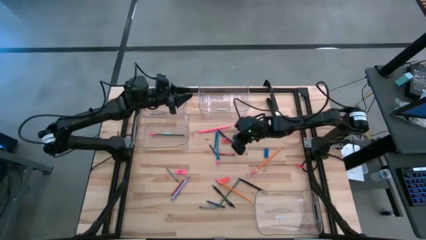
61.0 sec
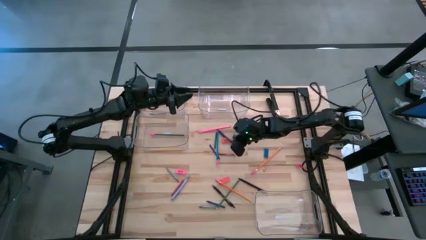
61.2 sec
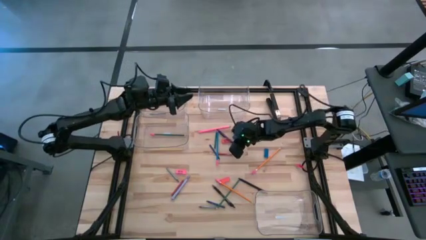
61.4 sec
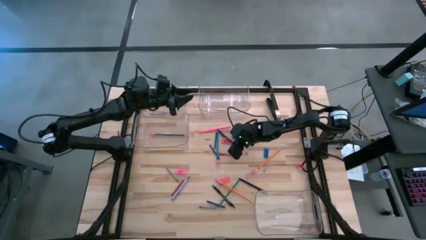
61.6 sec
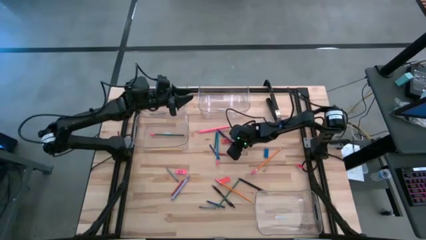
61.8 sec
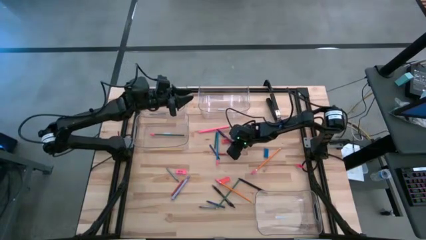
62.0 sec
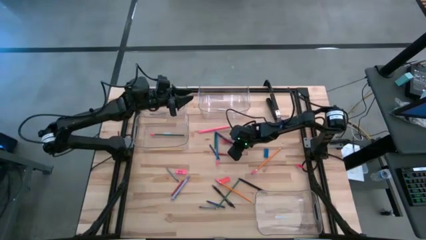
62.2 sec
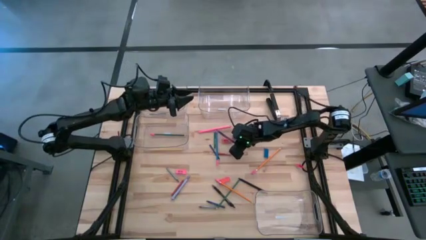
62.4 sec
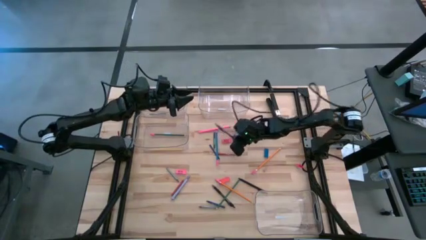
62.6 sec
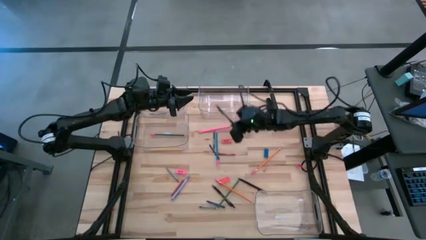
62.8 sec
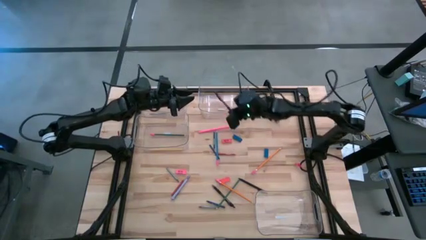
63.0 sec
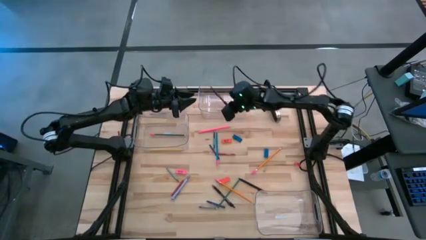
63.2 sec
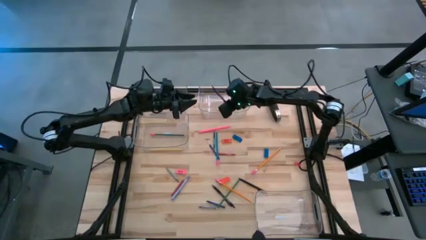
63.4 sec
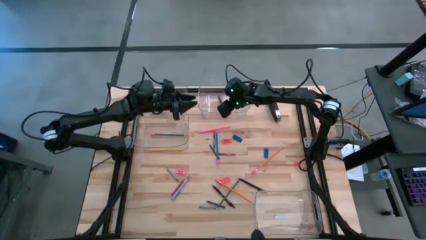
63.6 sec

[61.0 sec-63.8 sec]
Task: Sort crayons/erasers/pens/pencils in bins
Put the violet pen into the top right transparent bin

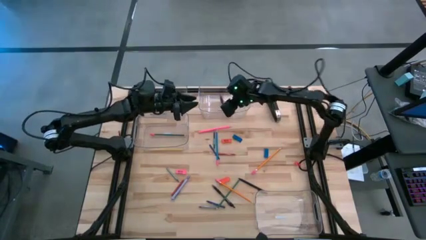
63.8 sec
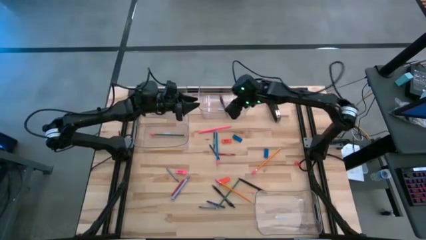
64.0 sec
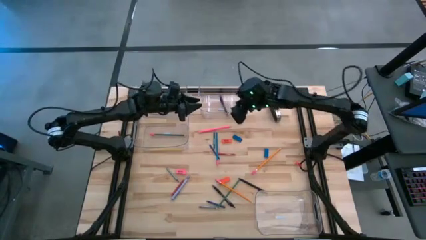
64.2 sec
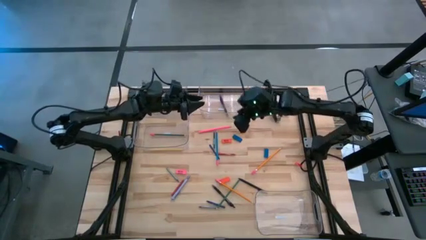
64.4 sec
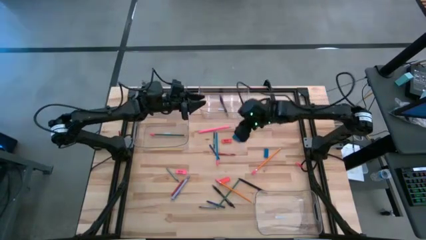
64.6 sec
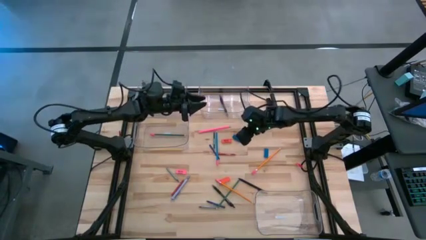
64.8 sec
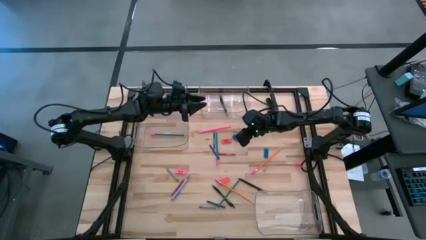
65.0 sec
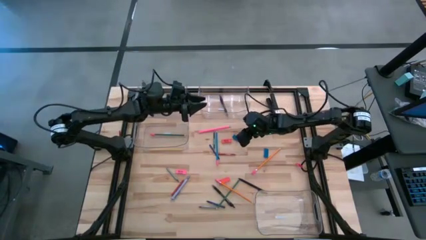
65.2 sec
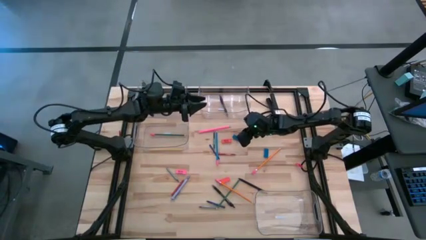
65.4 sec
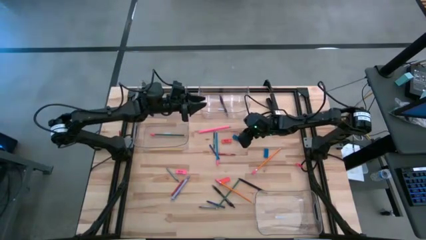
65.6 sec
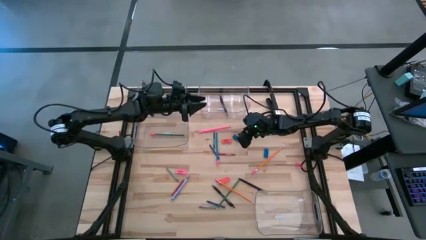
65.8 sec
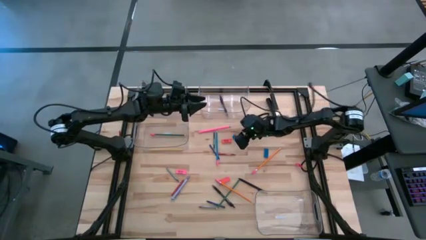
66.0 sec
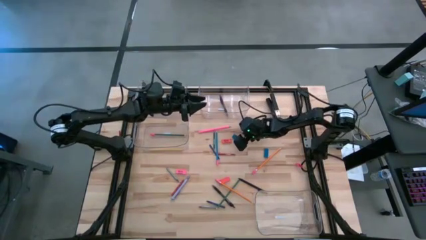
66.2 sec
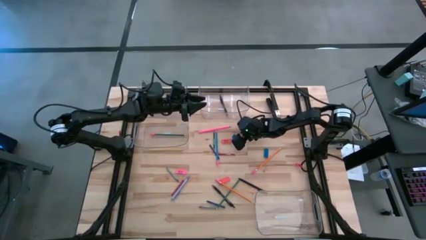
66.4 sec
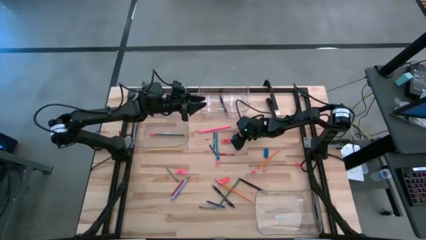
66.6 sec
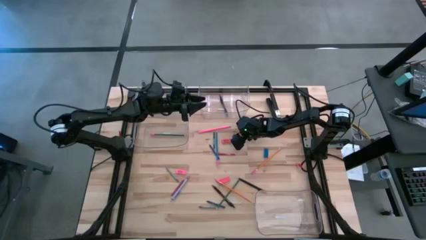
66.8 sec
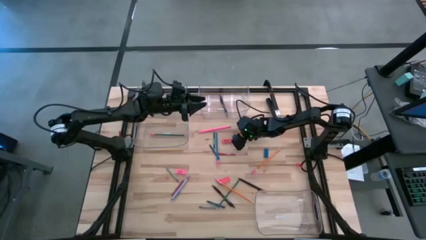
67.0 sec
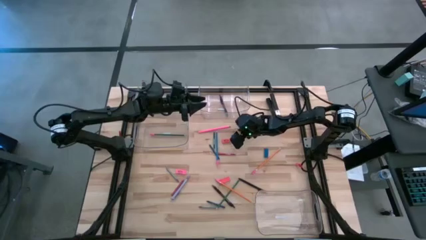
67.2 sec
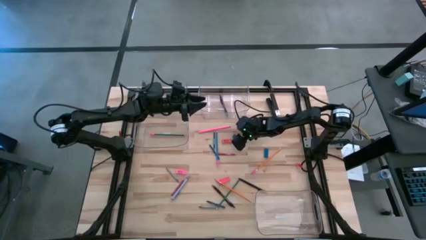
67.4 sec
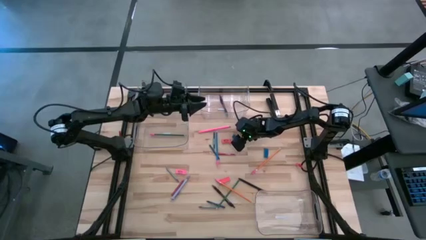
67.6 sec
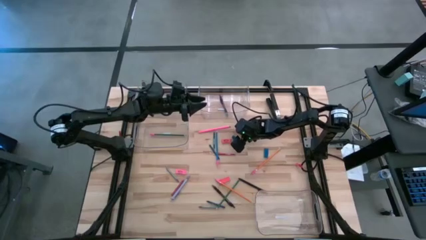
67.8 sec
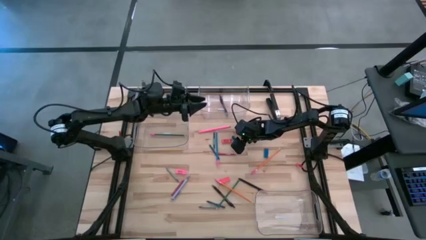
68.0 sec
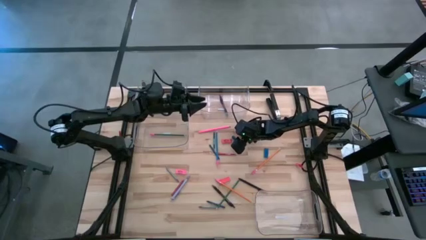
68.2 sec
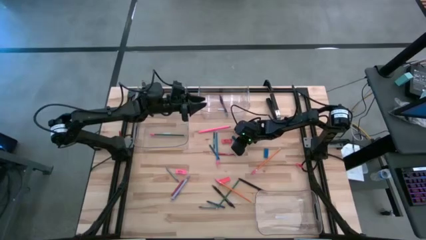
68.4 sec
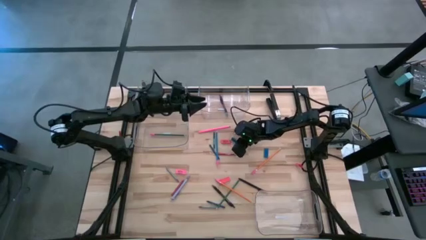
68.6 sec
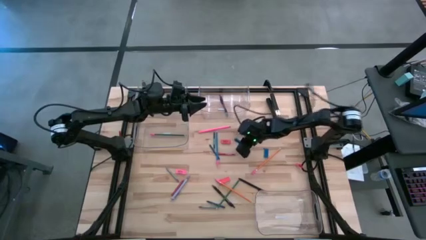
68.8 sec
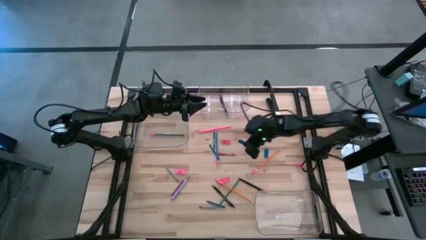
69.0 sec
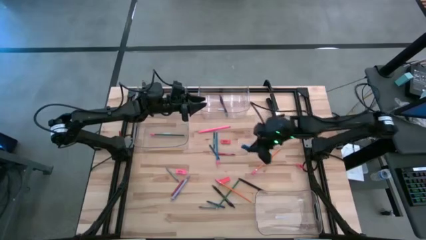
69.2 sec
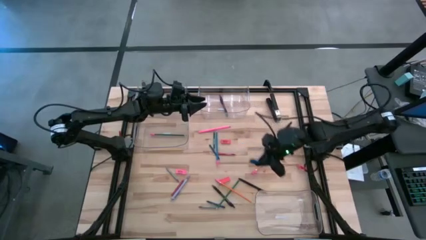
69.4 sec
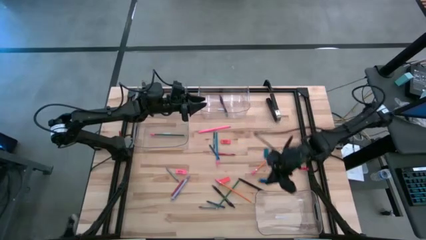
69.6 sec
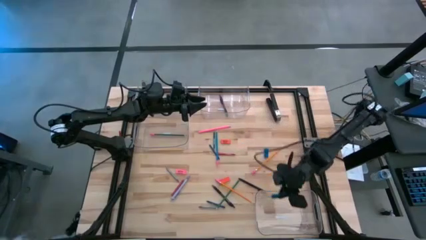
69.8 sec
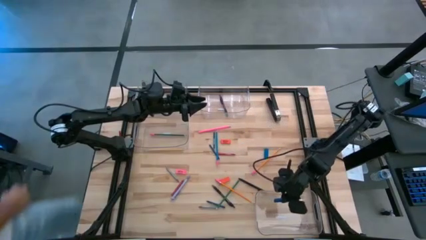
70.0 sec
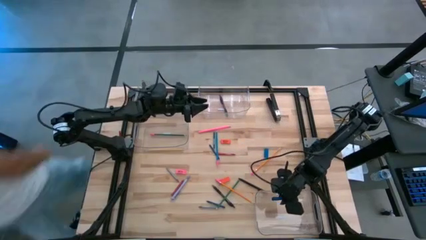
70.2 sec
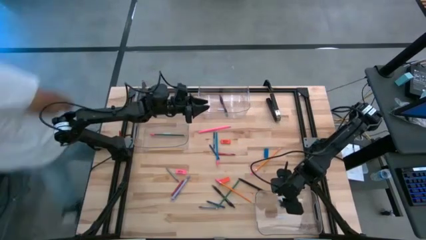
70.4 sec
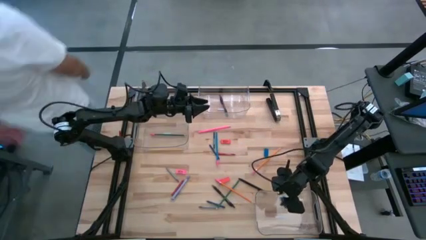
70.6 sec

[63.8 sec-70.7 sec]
Put the blue eraser into the bottom right transparent bin

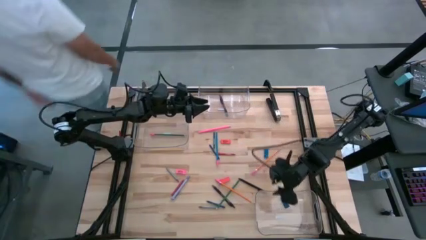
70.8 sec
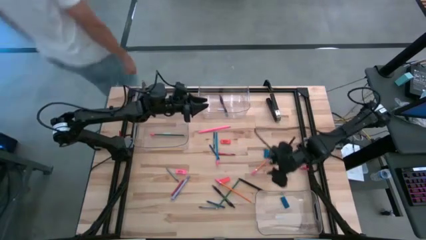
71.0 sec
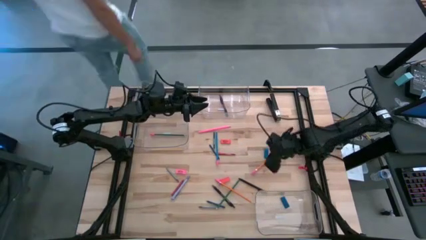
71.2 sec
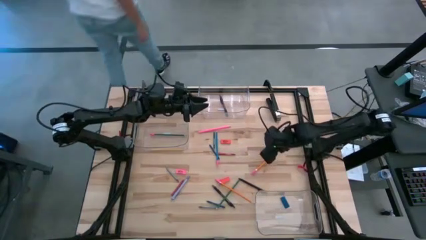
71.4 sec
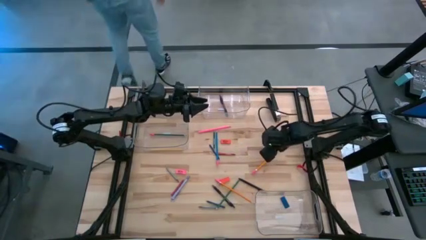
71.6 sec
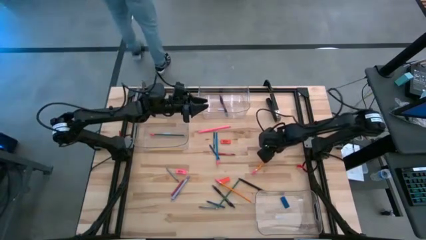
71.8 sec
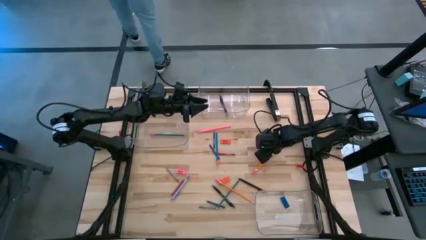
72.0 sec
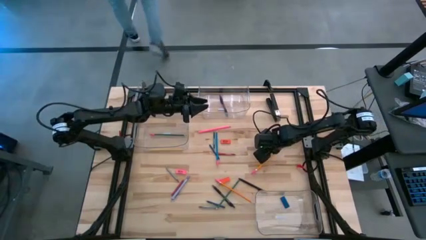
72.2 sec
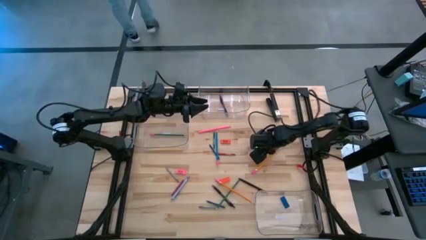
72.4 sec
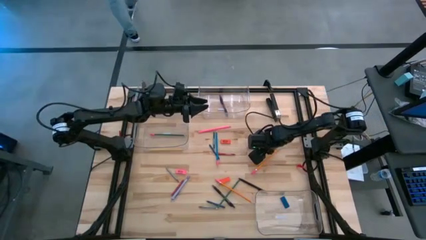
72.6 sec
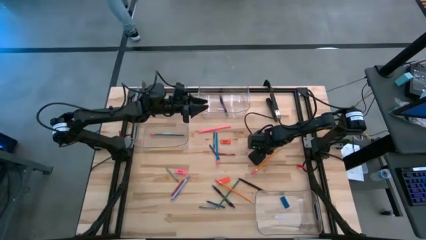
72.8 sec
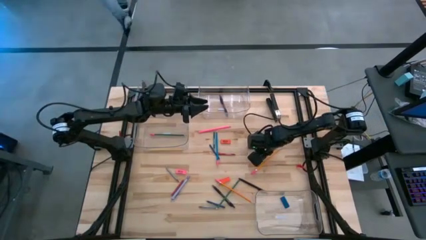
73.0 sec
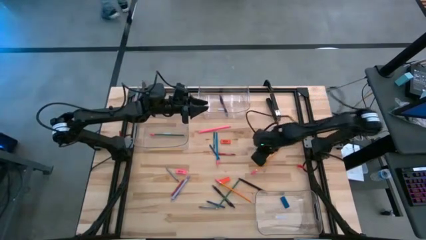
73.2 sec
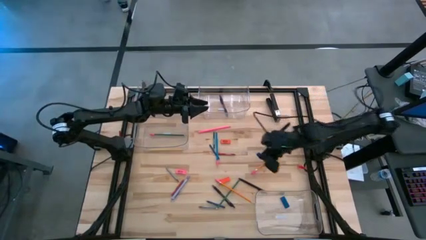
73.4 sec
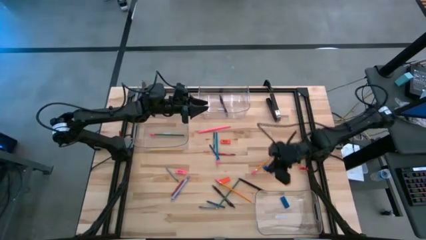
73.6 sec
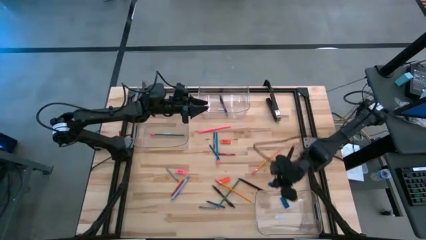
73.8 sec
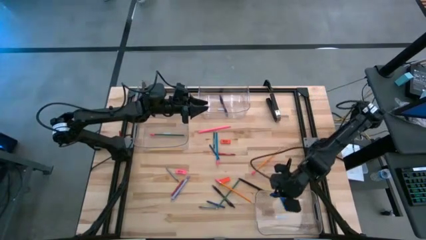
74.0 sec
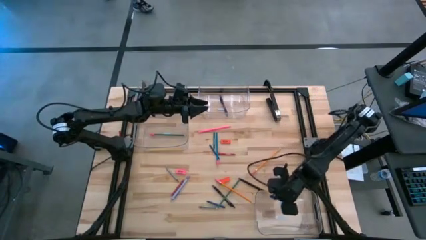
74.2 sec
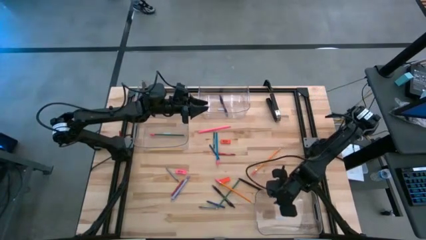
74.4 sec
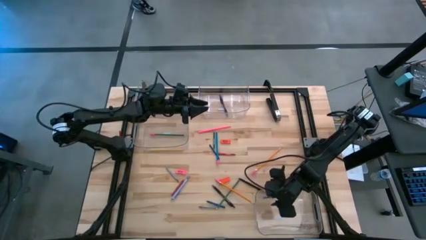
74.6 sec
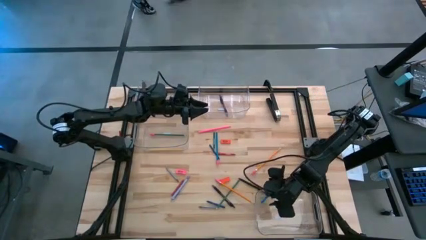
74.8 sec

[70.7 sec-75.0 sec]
Put the blue eraser into the bottom right transparent bin

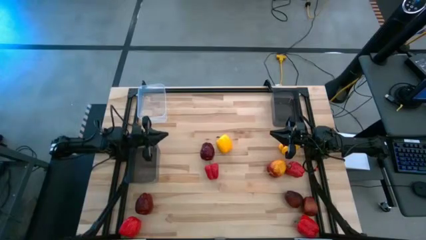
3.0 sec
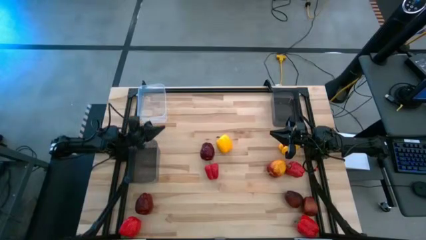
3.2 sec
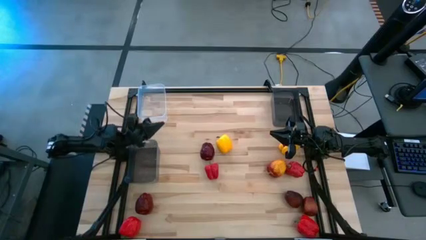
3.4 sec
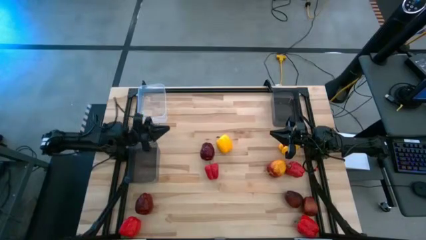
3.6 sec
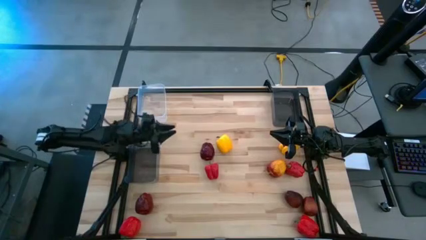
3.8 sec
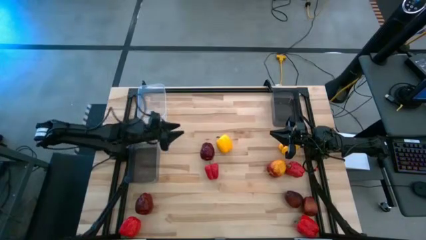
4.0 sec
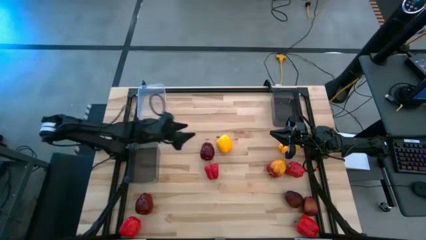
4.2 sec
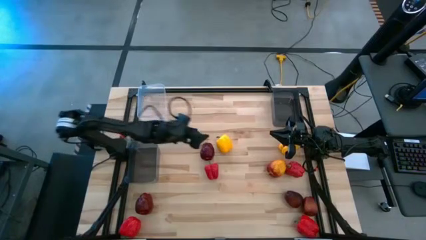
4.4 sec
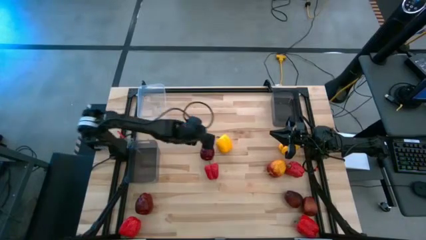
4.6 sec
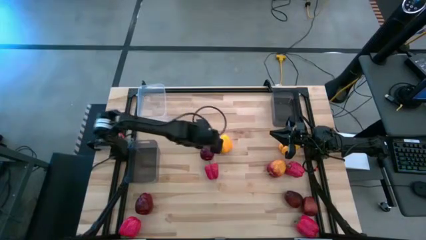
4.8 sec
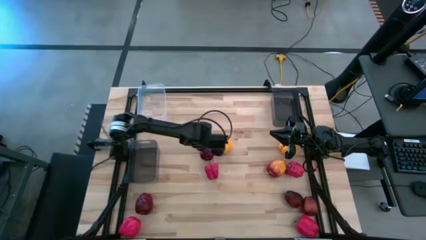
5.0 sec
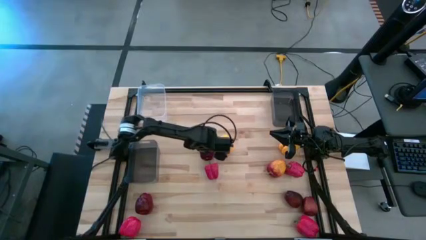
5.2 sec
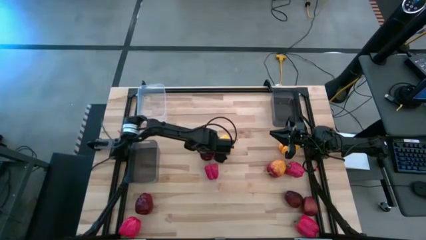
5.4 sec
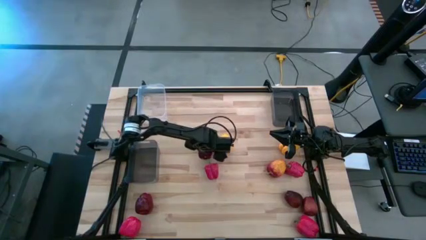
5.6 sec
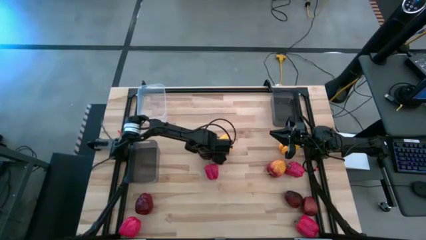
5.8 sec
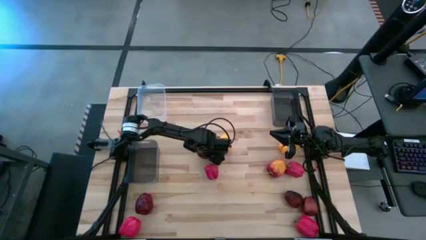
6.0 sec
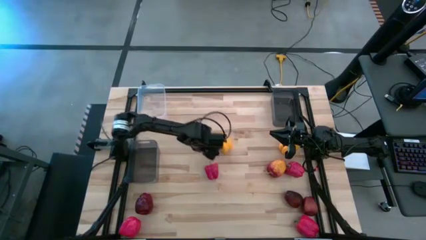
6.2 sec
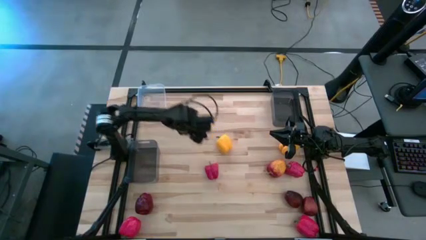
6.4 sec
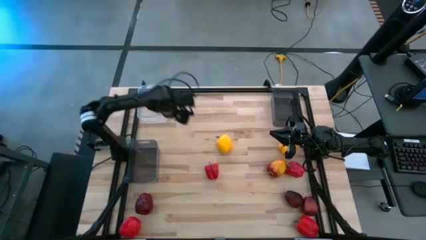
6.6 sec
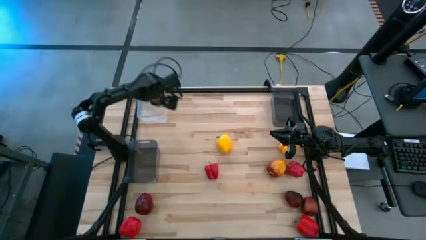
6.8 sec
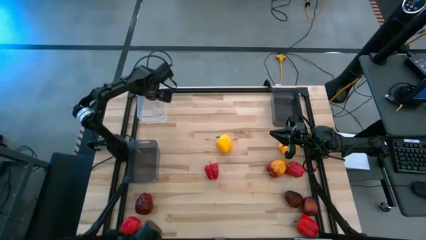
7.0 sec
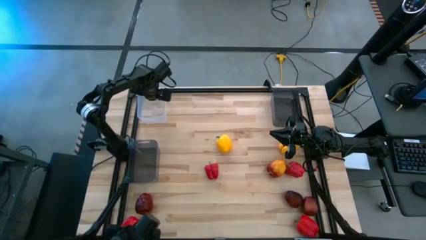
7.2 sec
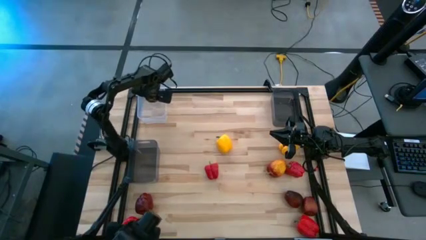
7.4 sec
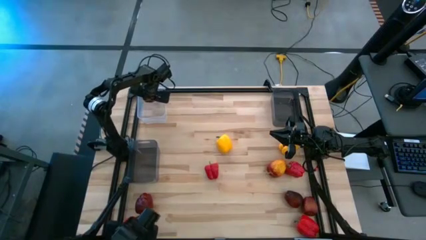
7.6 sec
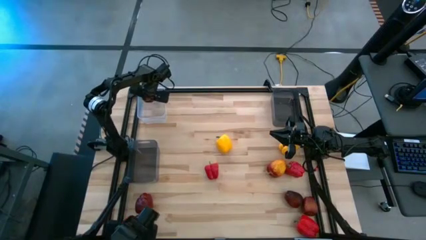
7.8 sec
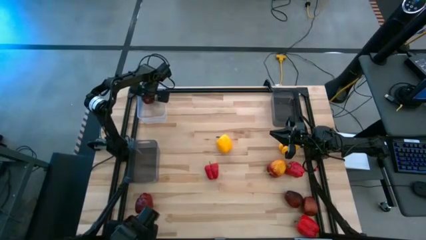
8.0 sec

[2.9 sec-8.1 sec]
Task: Sort produce into baskets
Put the red apple into the transparent bin
